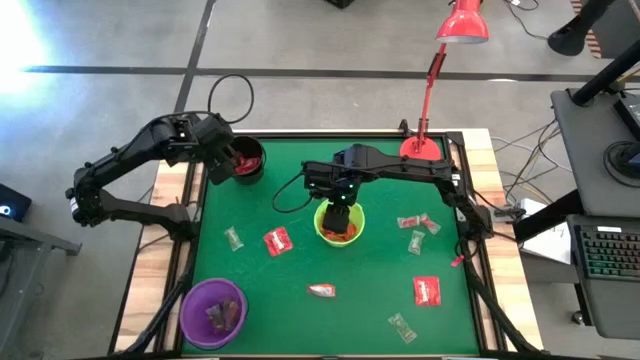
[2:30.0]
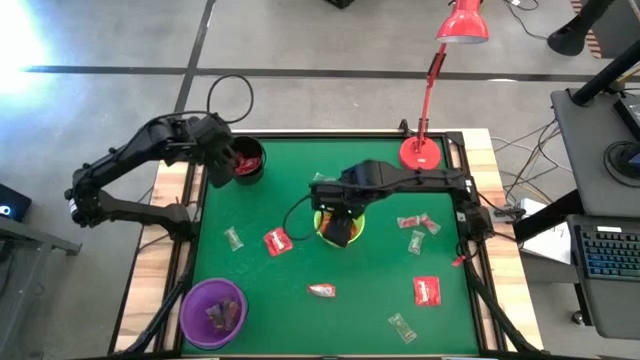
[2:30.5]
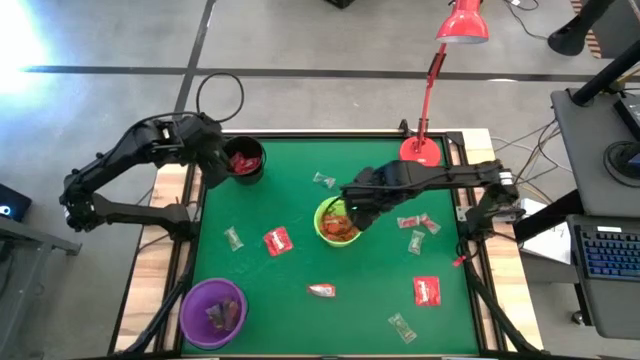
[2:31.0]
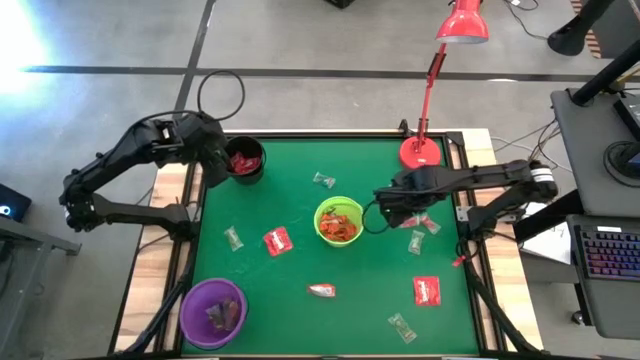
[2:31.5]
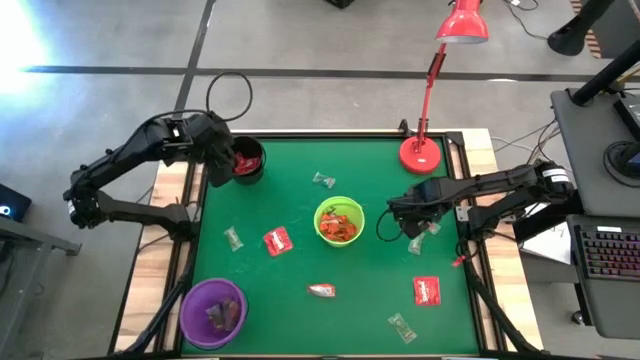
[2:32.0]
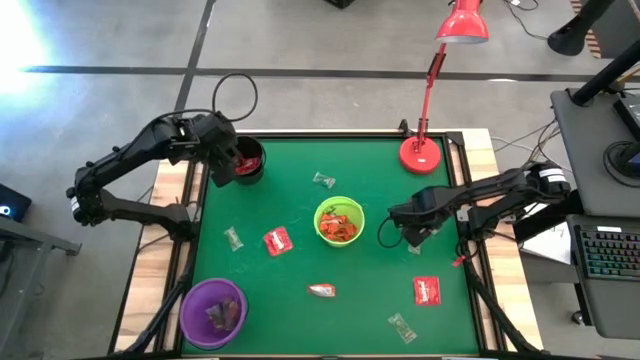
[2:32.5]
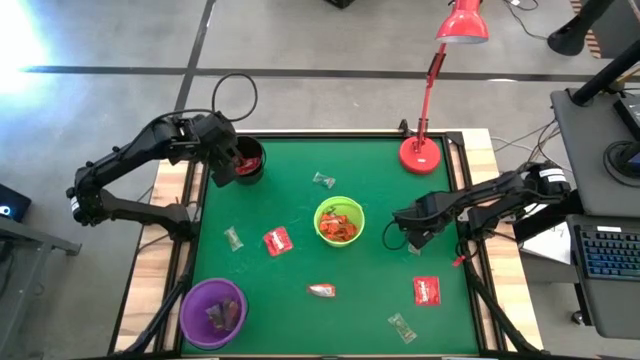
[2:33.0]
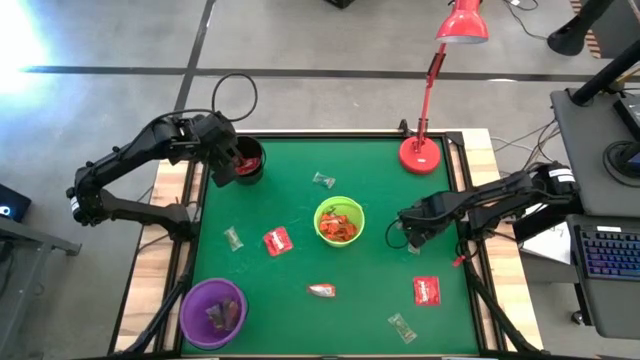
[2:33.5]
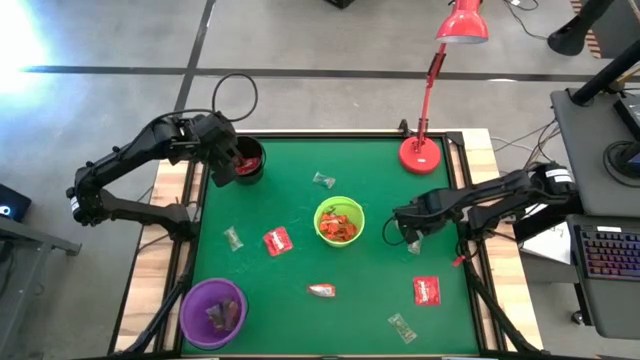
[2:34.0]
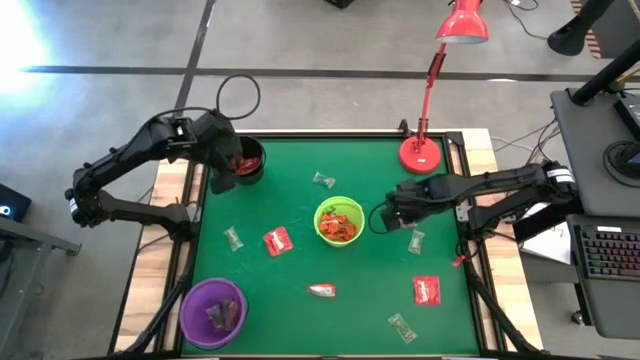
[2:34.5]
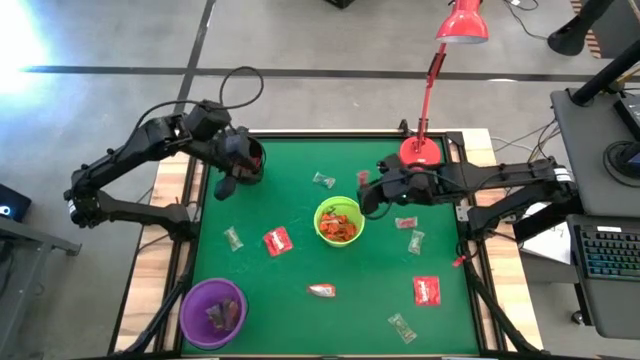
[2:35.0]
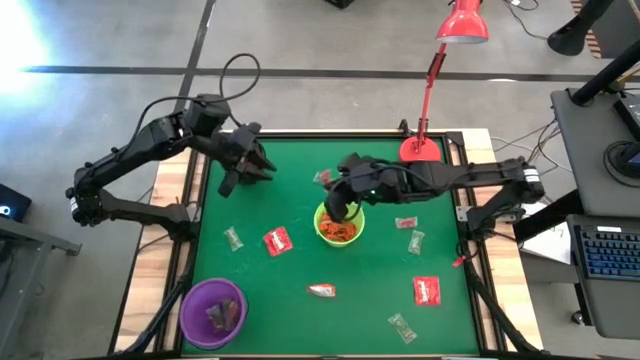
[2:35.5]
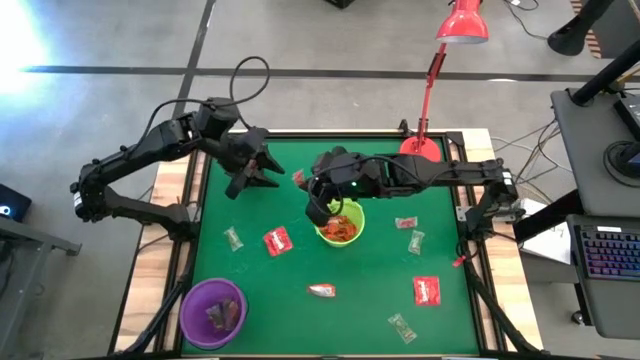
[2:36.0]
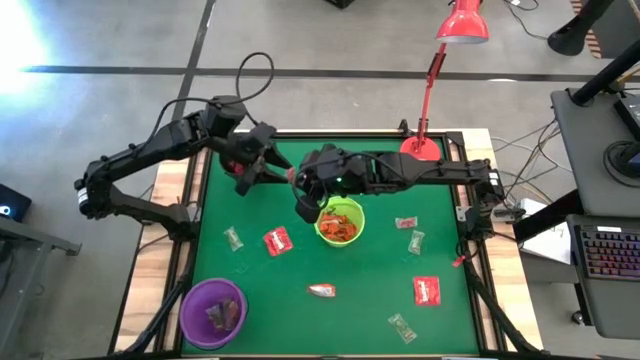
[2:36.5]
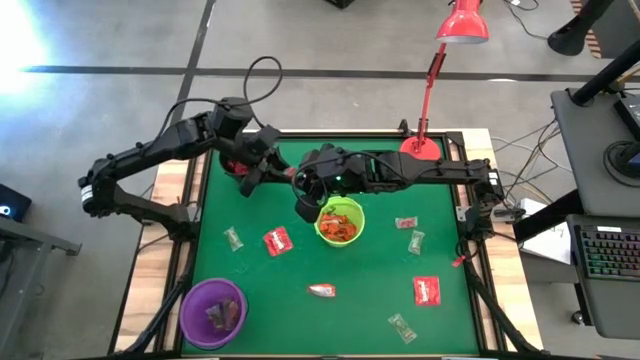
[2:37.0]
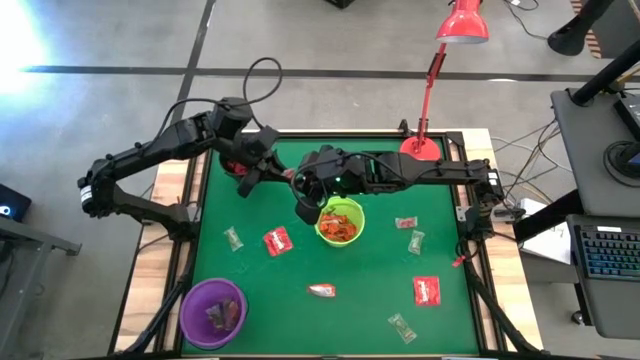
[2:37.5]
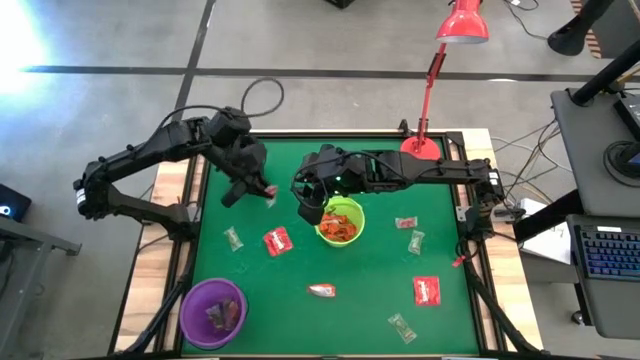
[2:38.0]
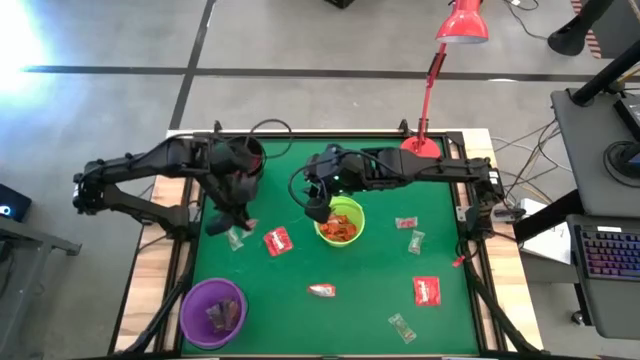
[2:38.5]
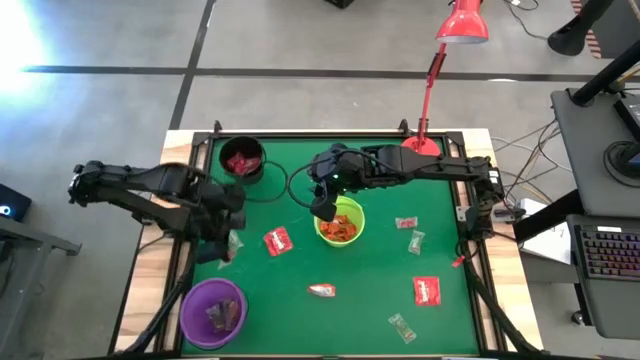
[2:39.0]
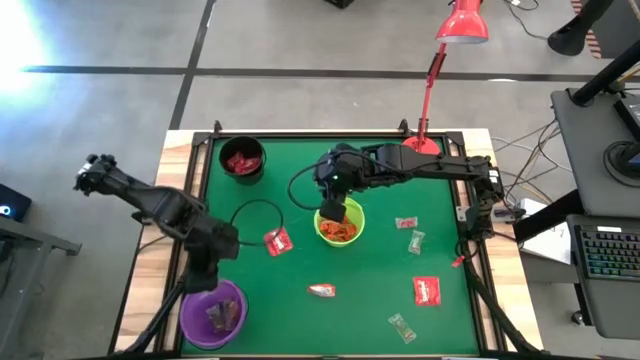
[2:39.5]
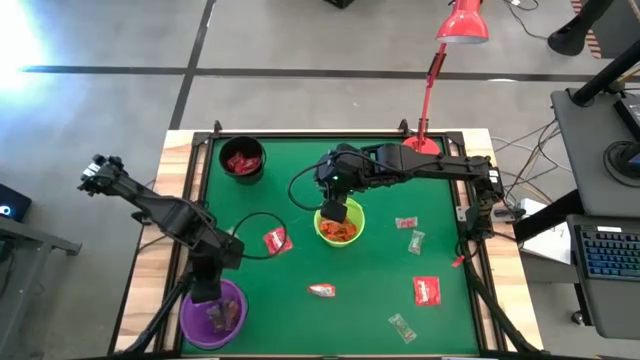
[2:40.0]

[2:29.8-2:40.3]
Task: Sort candy
Put the pink gummy into the purple bucket

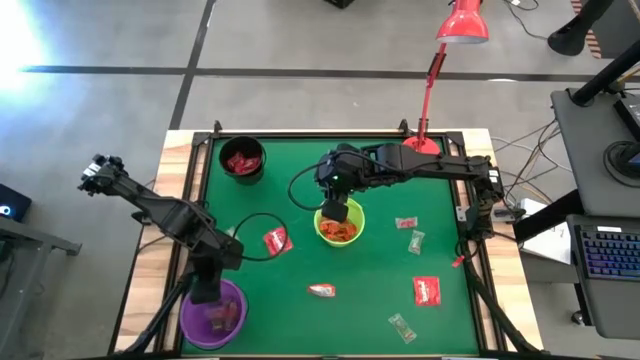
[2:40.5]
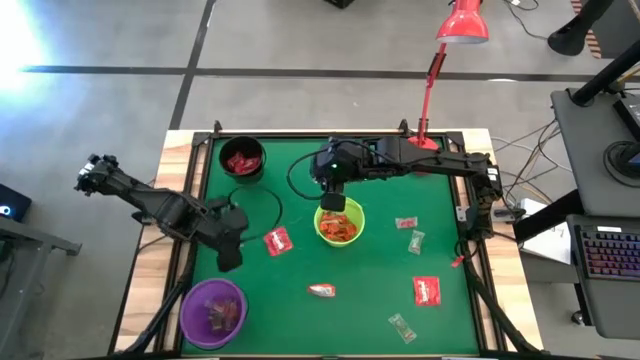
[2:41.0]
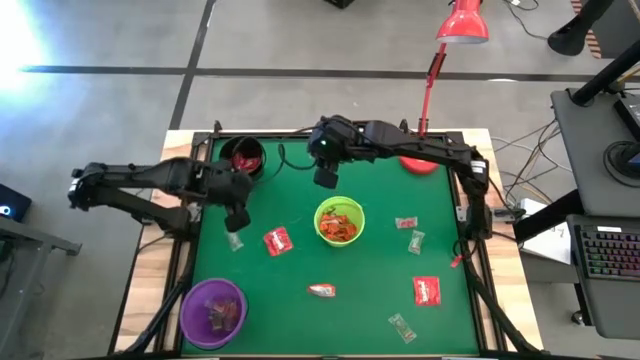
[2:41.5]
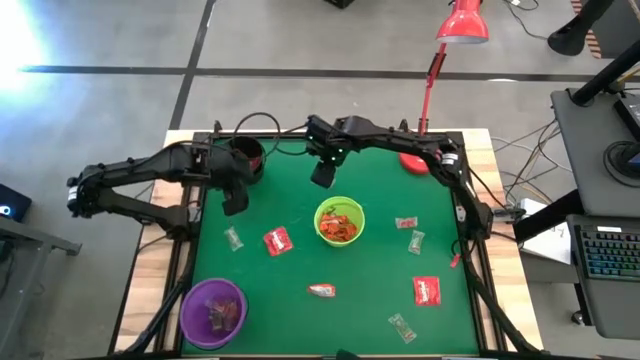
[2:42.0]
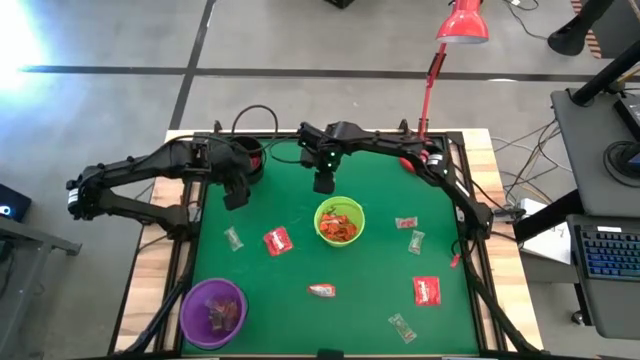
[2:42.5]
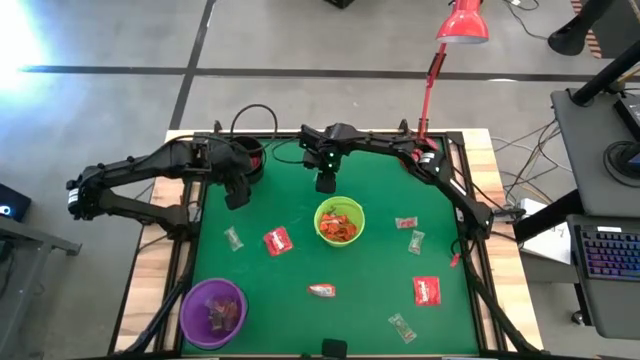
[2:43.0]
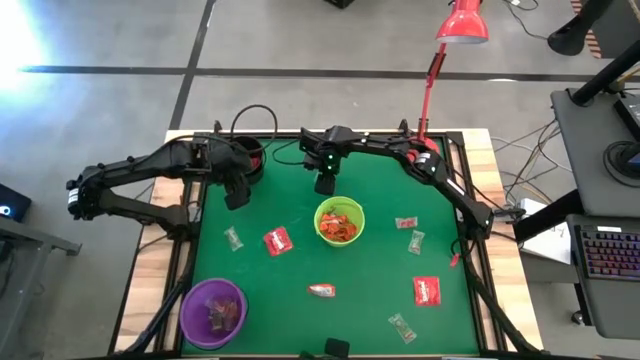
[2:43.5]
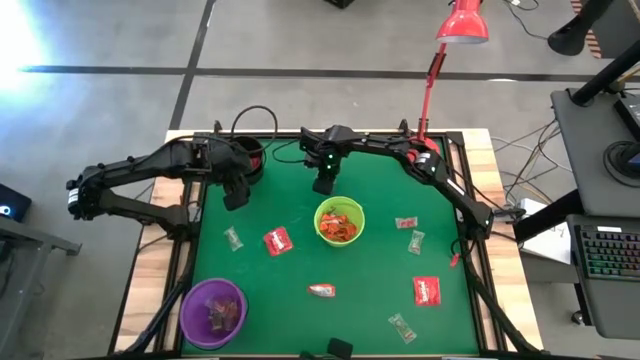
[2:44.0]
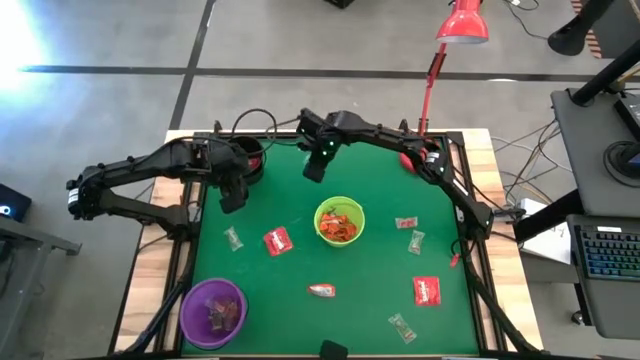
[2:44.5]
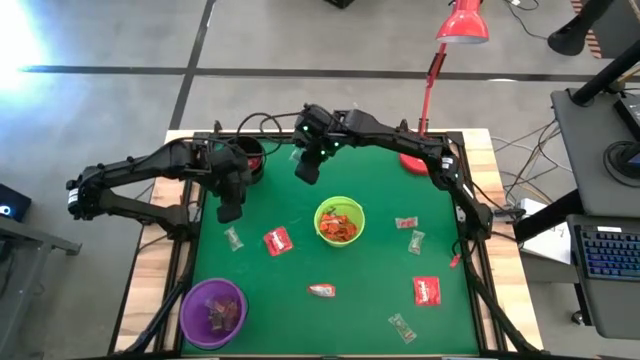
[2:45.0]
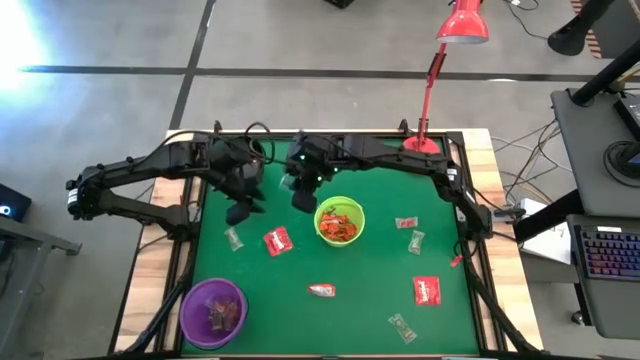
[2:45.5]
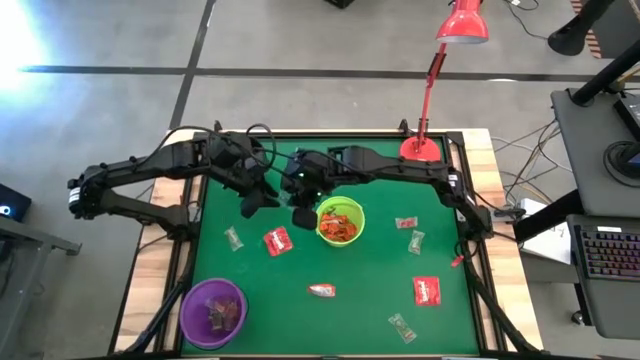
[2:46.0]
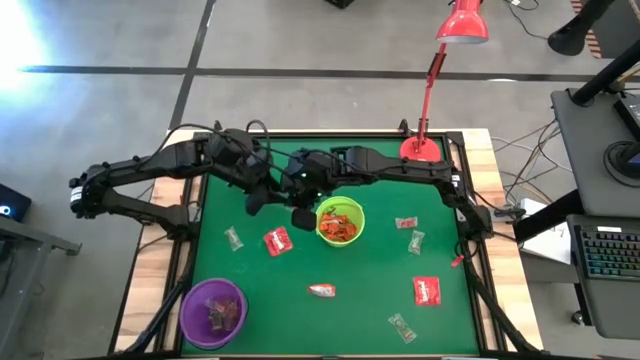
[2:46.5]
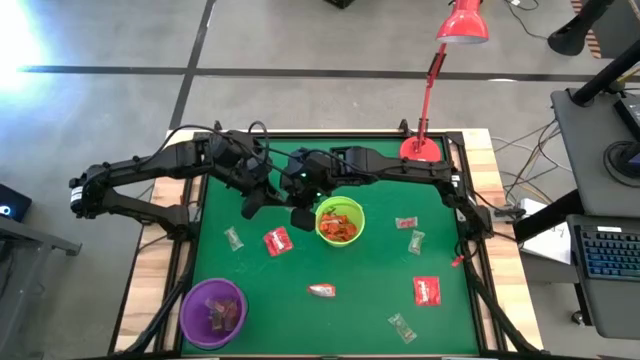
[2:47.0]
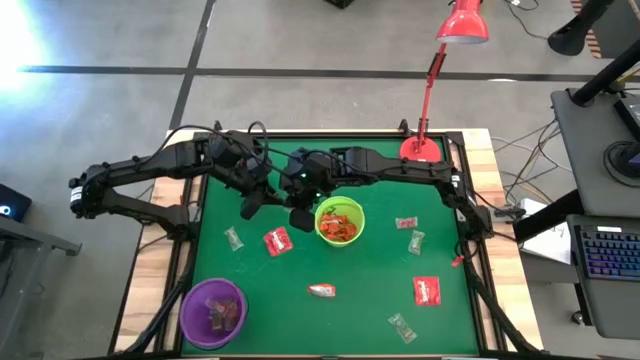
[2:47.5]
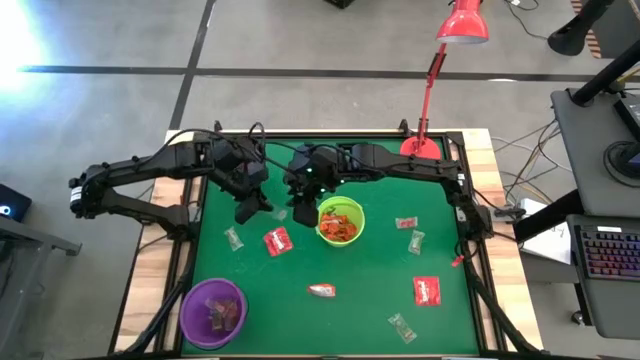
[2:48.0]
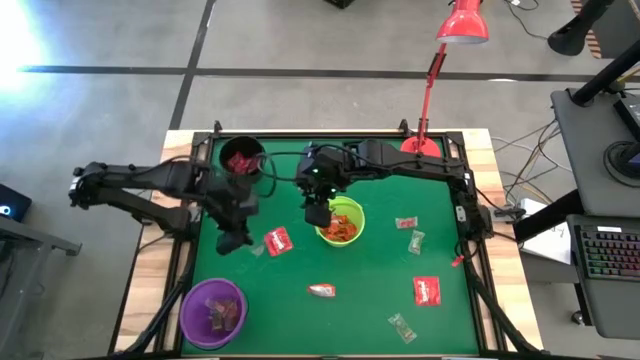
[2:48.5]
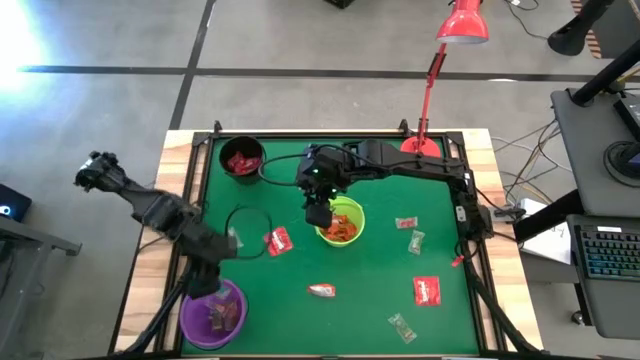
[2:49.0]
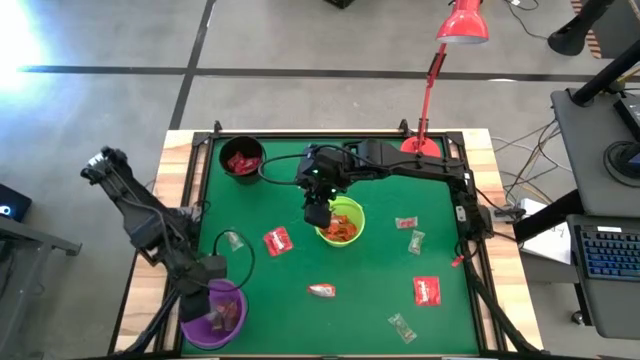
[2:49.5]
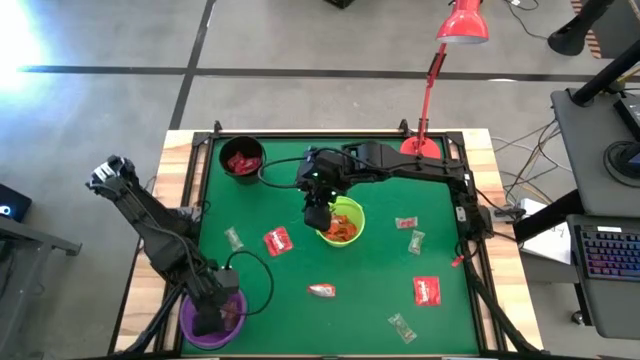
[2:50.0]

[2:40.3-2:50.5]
Put the blue gummy into the purple bucket
